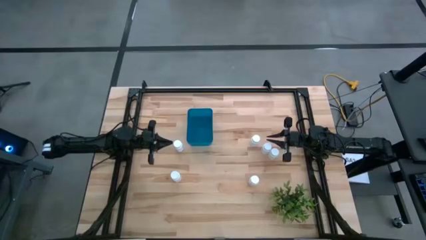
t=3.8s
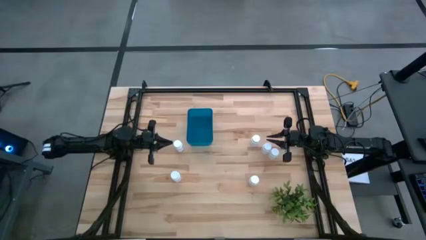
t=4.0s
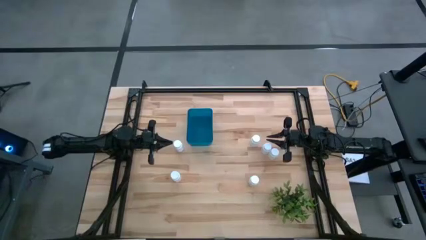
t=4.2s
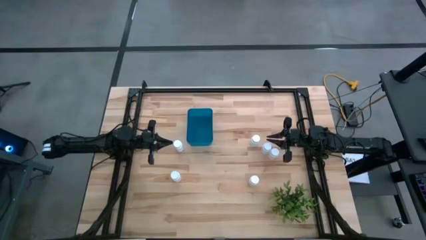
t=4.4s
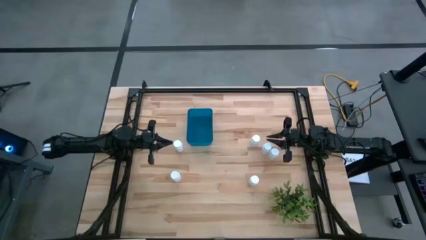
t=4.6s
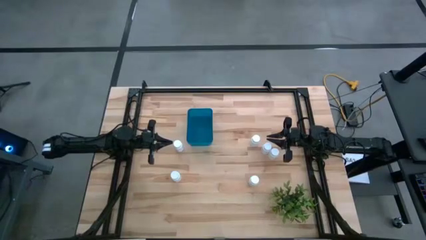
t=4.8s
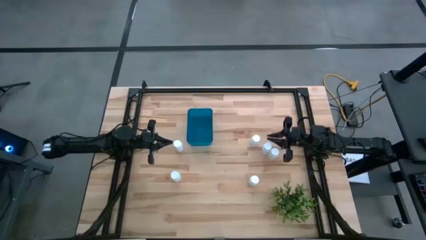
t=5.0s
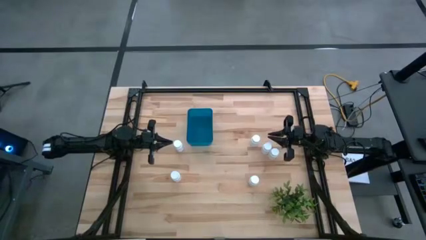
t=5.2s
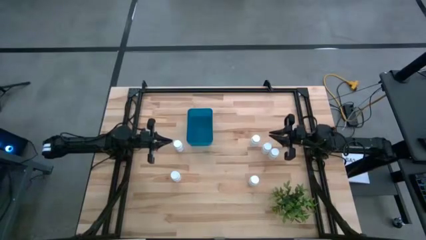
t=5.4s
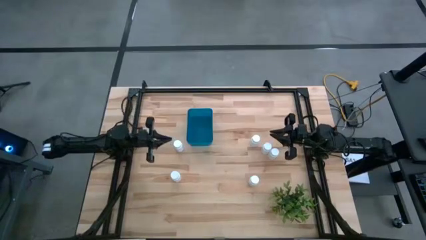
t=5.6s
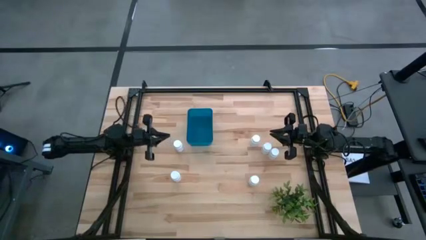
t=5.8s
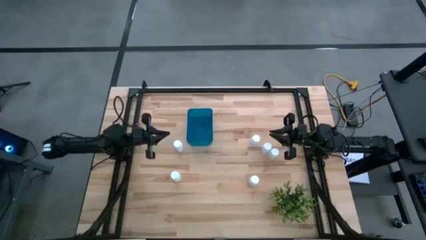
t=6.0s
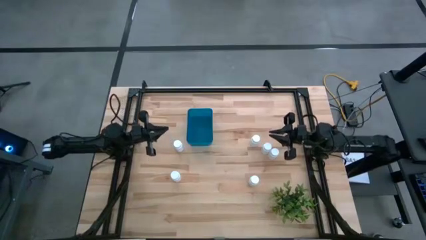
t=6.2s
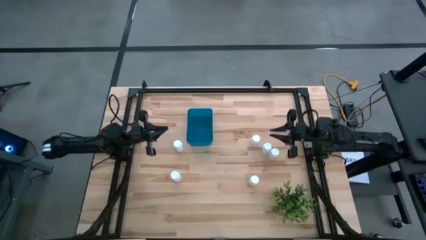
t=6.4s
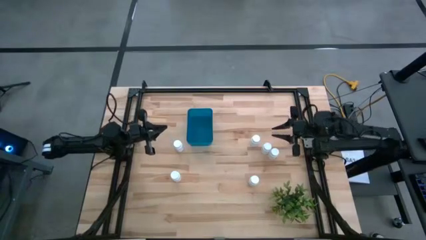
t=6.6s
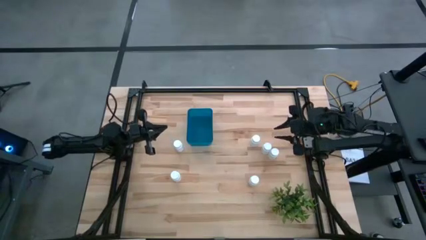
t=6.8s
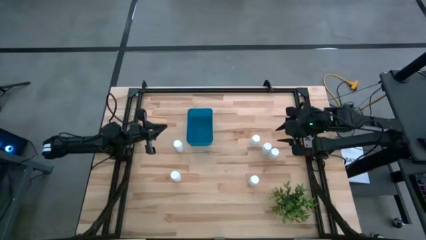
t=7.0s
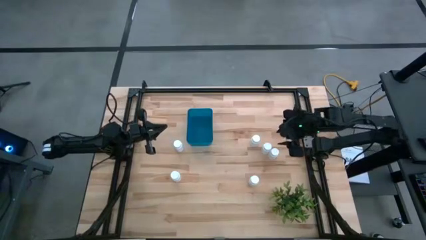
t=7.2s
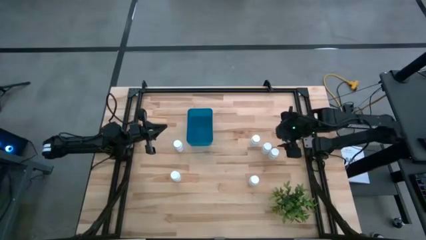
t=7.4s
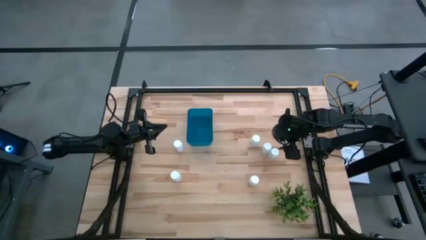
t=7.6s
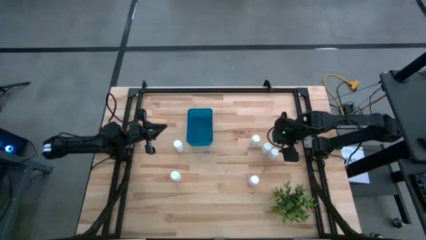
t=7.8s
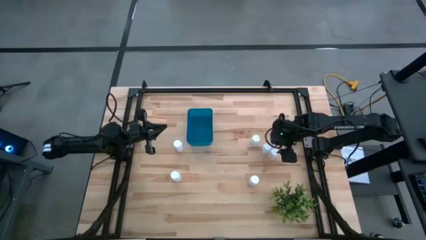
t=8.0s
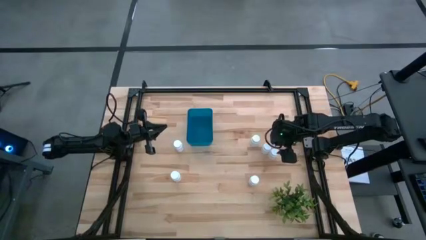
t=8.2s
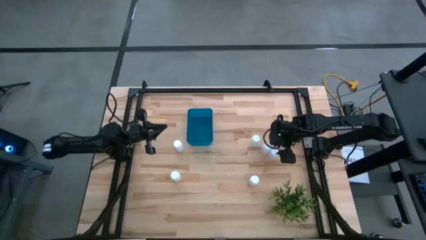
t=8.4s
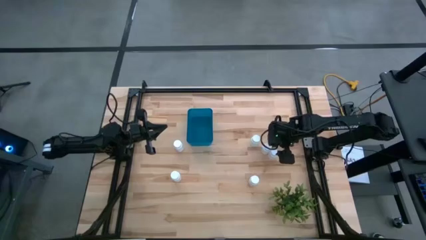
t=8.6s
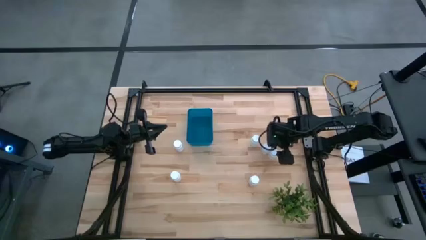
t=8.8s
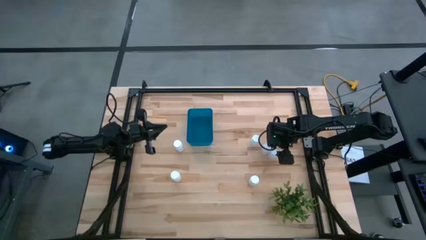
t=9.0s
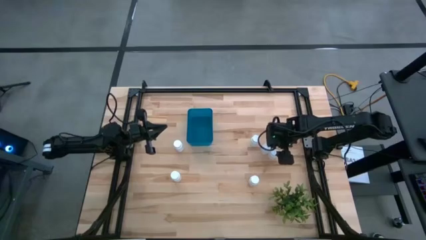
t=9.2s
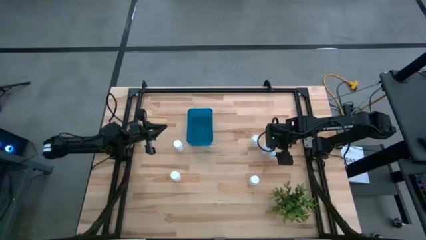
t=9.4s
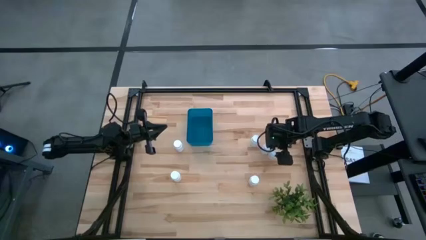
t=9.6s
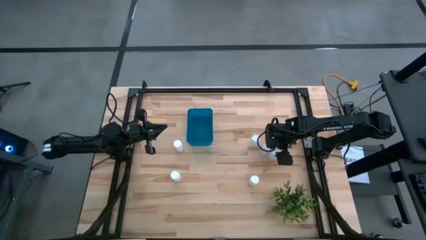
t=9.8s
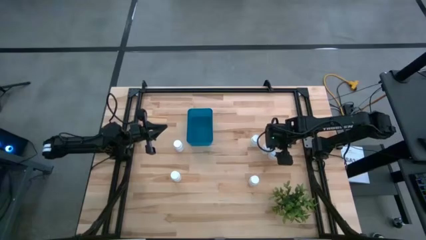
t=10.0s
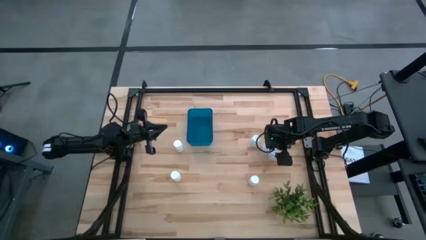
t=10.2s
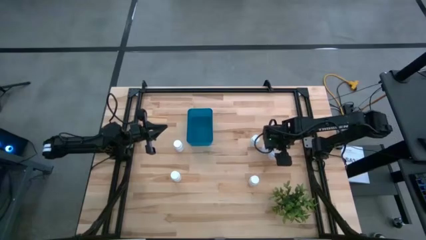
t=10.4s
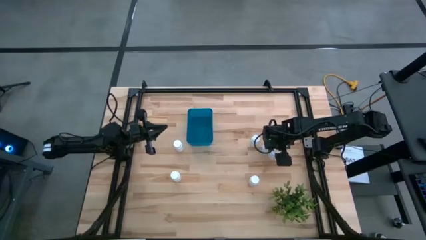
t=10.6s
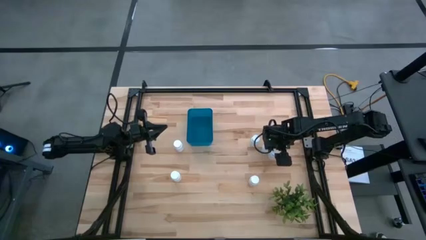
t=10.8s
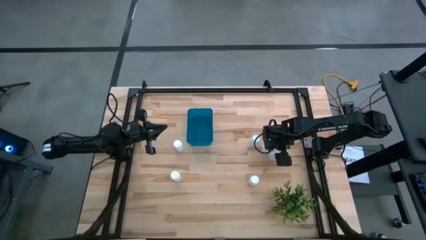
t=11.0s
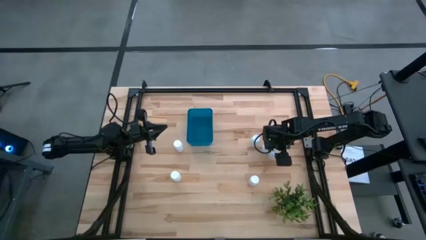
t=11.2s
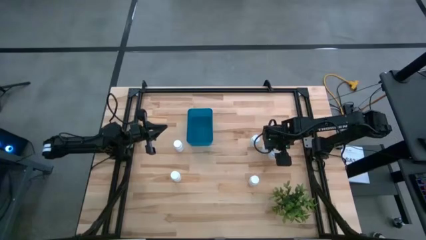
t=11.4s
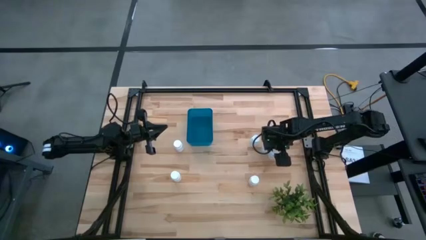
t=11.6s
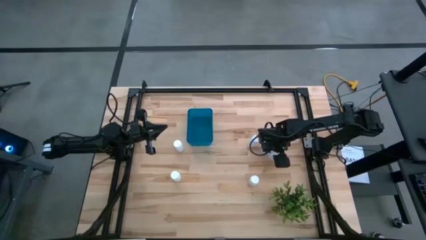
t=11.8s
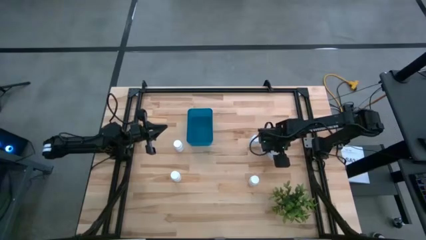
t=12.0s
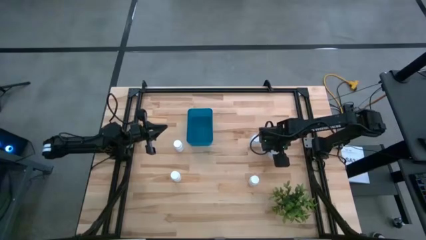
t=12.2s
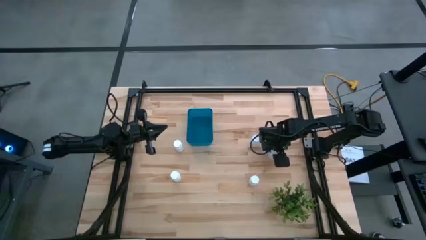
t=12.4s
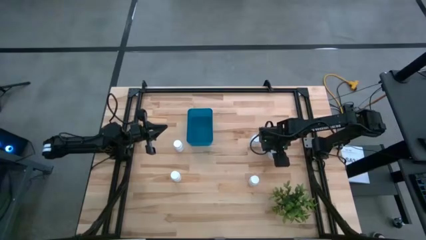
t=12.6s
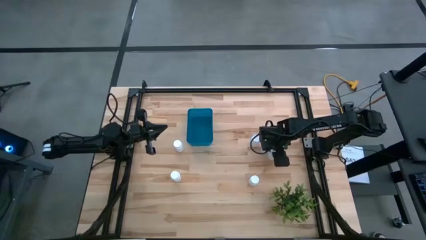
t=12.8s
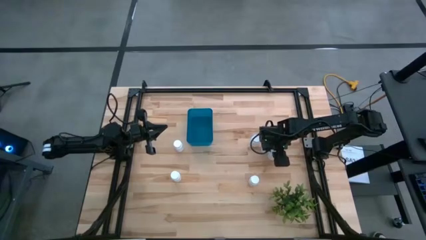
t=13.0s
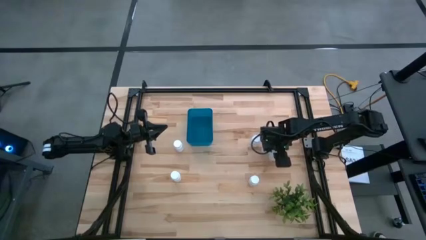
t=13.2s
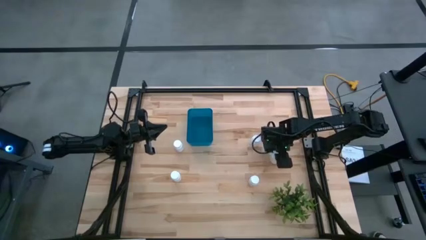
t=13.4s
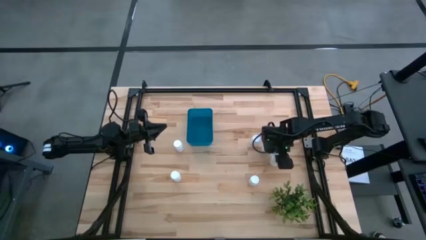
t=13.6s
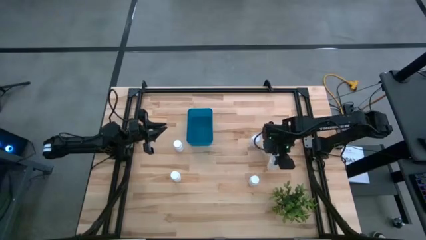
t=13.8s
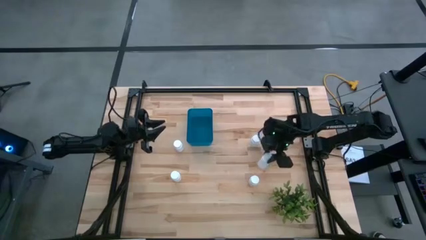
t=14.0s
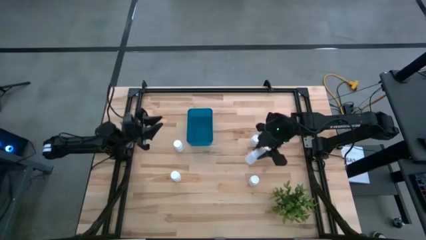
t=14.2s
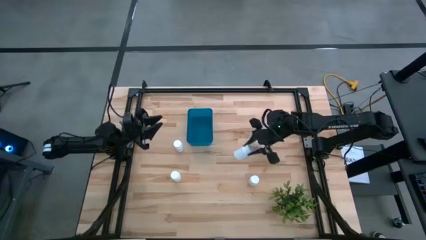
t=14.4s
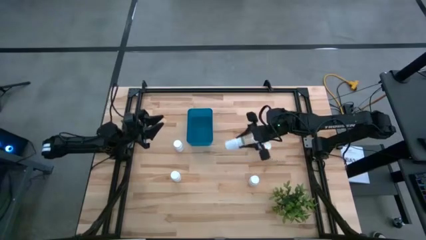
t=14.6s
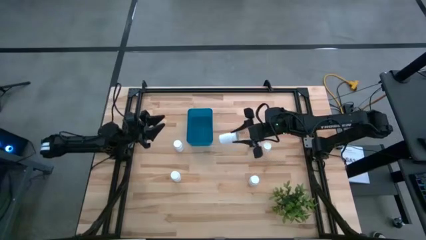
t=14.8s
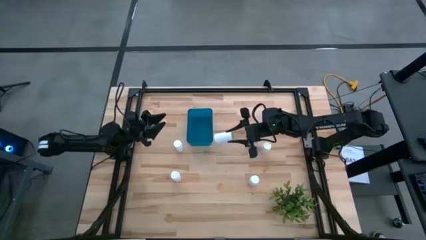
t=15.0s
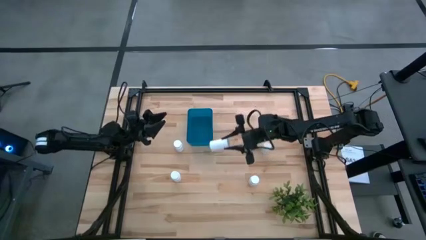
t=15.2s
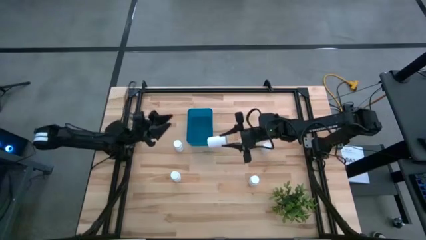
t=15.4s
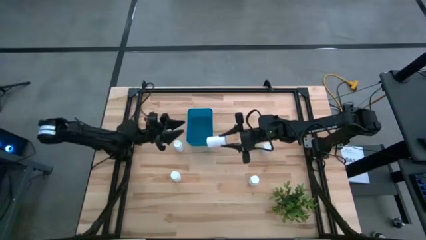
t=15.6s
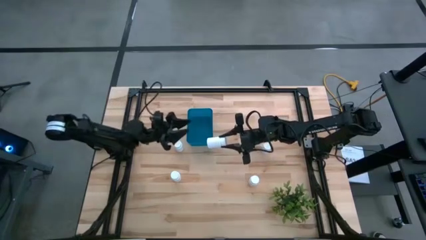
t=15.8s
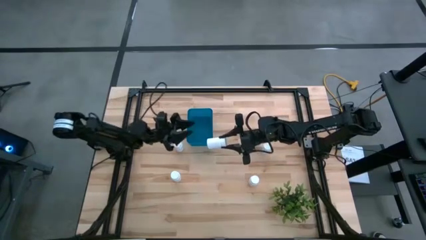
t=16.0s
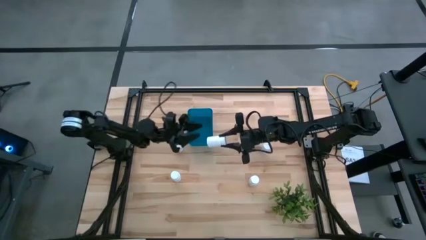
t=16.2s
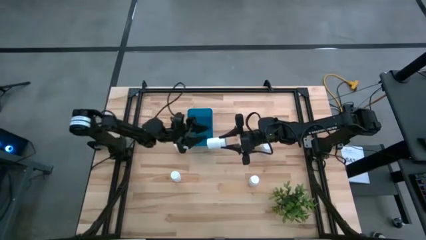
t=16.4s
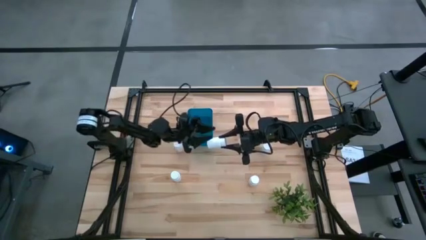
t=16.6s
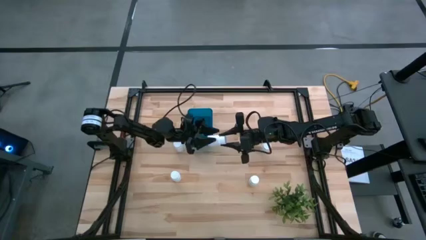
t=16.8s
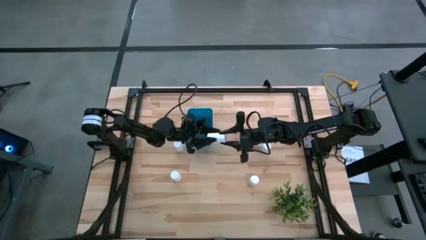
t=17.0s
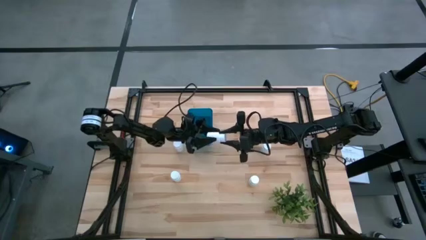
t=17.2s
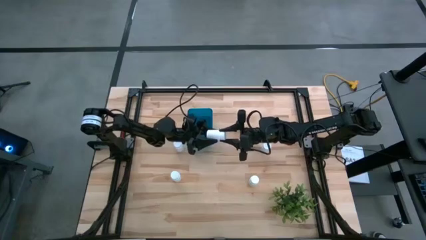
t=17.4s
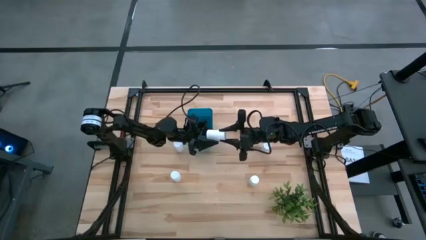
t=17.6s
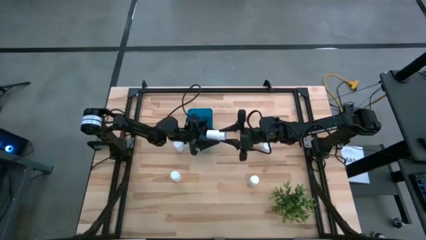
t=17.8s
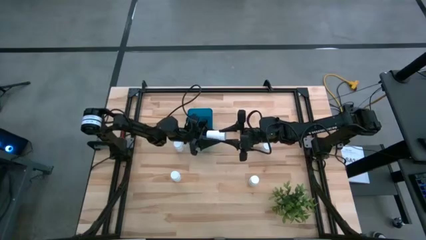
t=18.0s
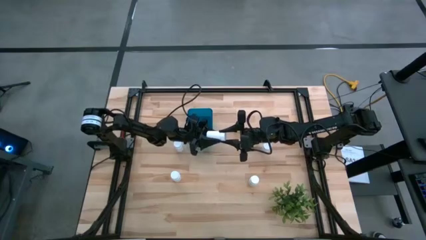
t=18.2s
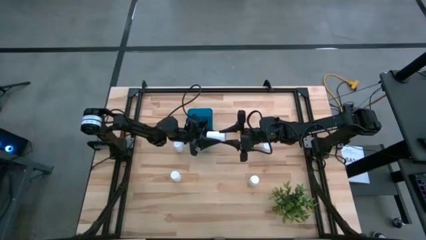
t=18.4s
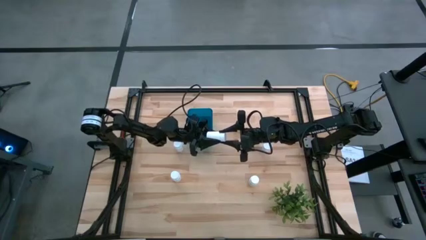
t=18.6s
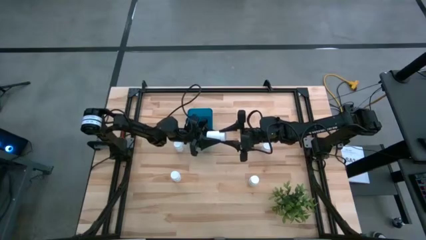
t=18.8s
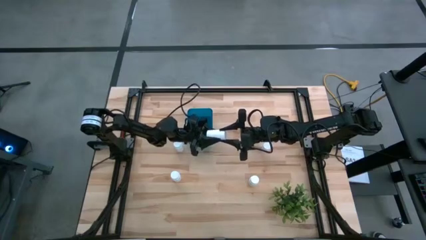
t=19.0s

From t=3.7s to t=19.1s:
Task: Pick and place pill bottles into a basket
Put the white medicine bottle into the blue bin
